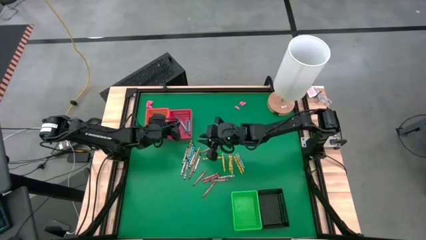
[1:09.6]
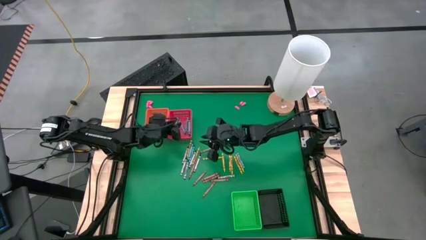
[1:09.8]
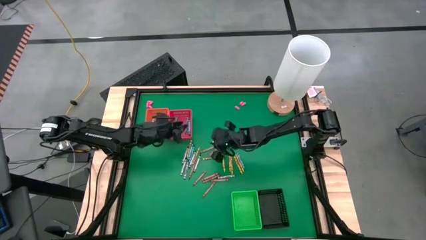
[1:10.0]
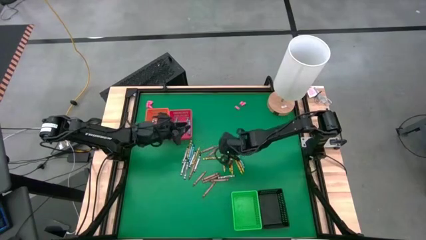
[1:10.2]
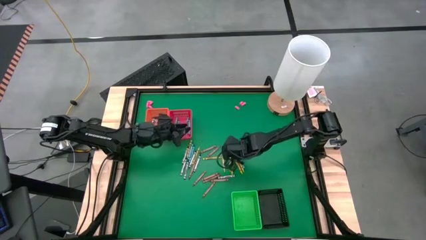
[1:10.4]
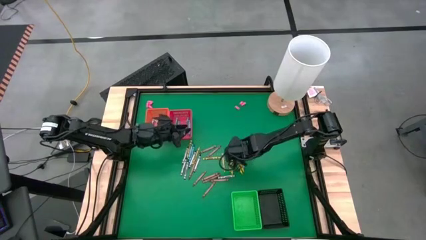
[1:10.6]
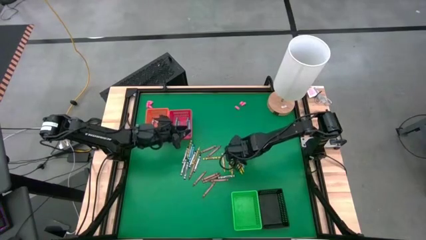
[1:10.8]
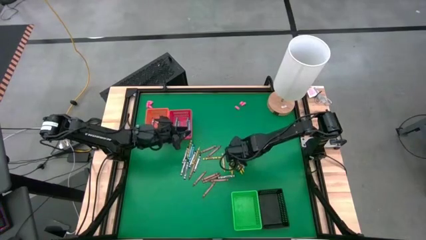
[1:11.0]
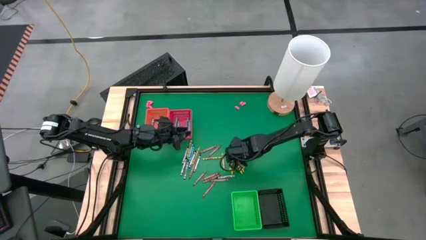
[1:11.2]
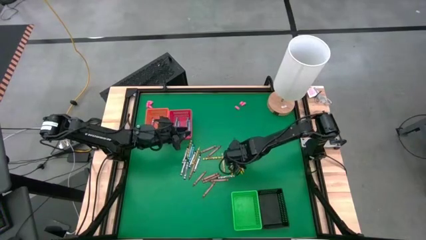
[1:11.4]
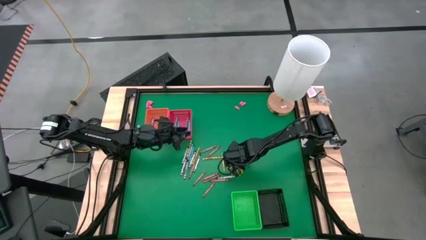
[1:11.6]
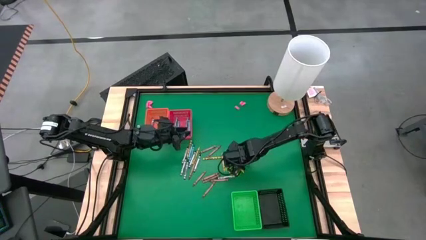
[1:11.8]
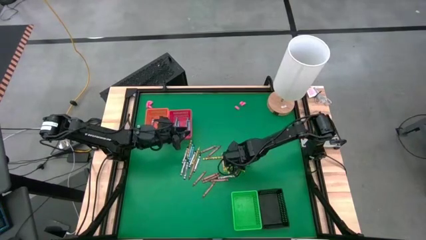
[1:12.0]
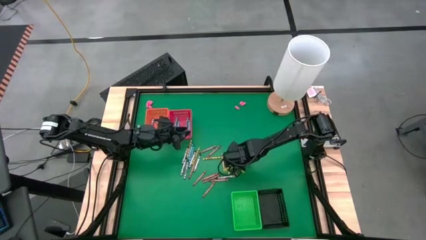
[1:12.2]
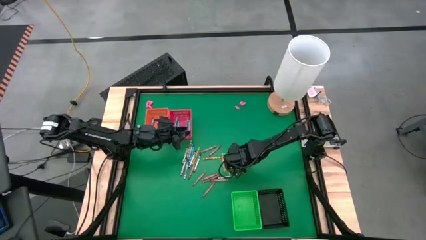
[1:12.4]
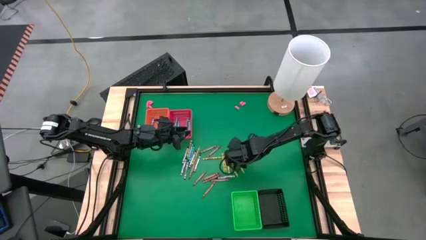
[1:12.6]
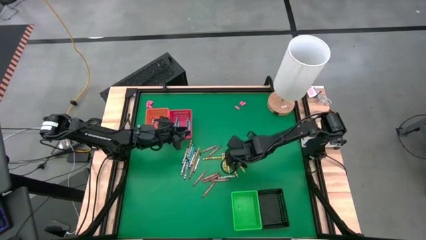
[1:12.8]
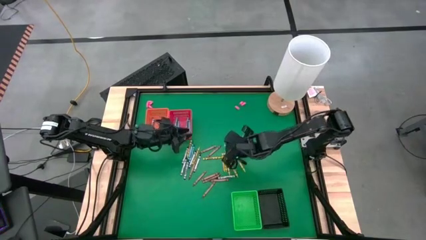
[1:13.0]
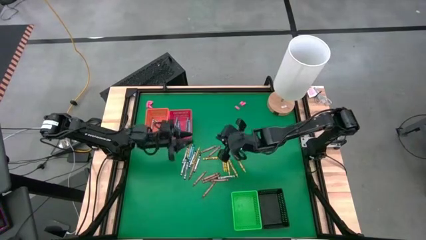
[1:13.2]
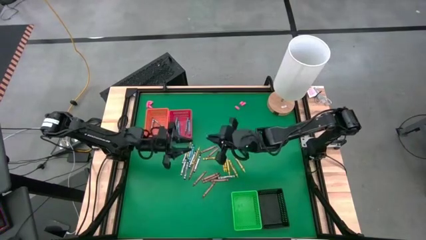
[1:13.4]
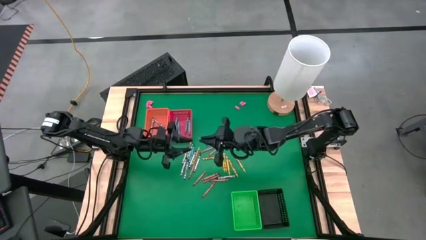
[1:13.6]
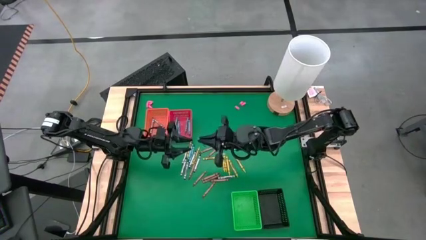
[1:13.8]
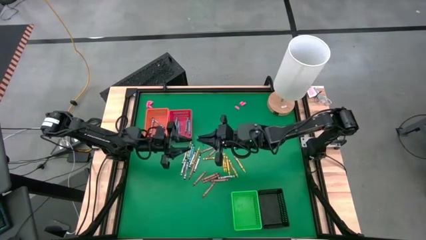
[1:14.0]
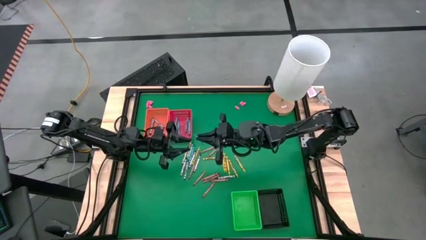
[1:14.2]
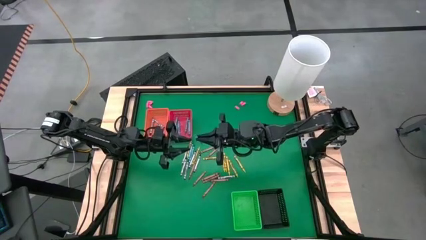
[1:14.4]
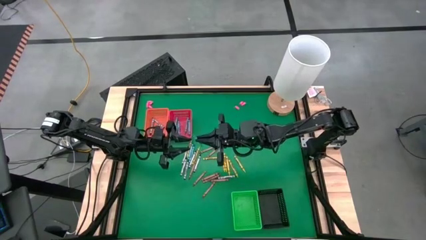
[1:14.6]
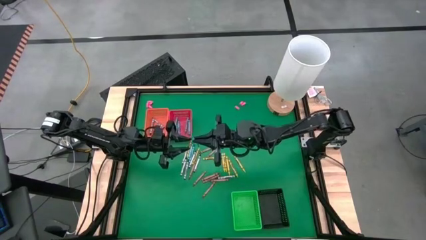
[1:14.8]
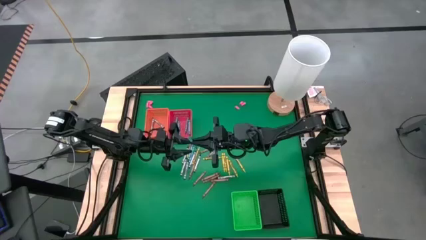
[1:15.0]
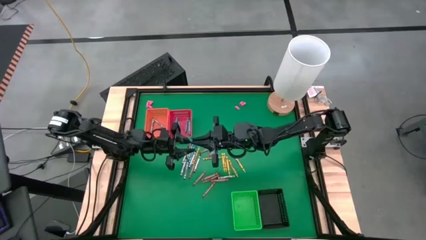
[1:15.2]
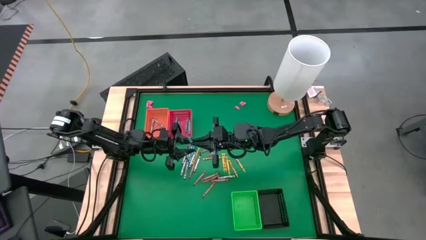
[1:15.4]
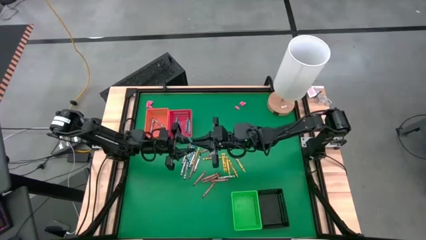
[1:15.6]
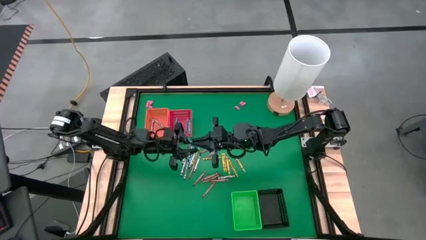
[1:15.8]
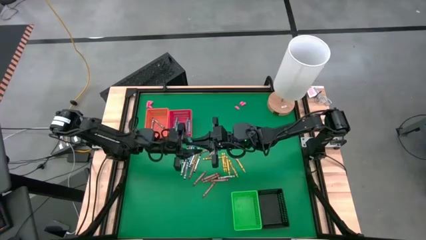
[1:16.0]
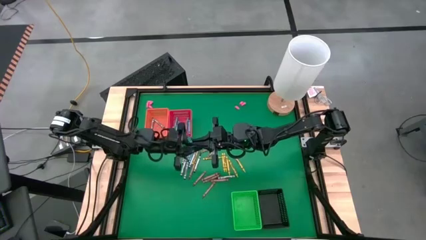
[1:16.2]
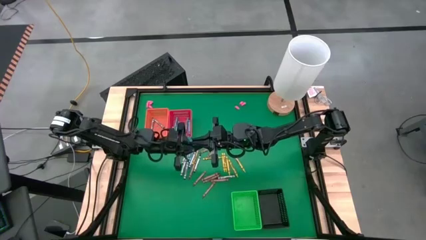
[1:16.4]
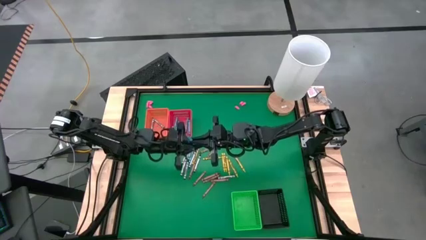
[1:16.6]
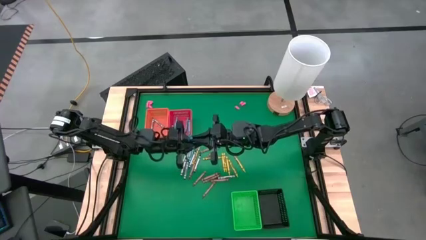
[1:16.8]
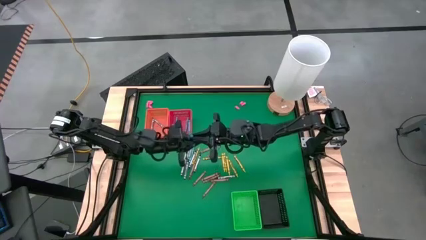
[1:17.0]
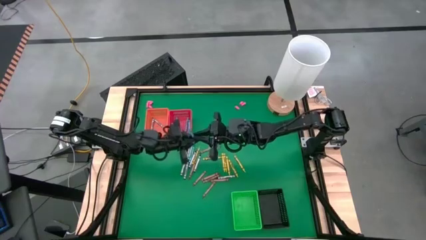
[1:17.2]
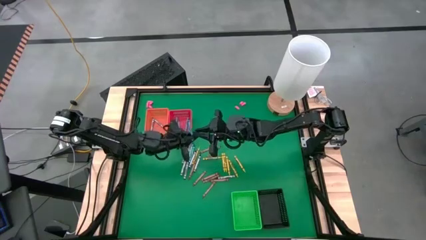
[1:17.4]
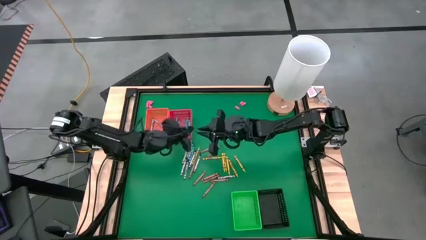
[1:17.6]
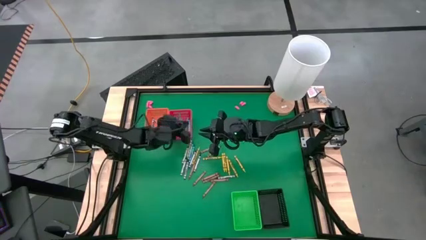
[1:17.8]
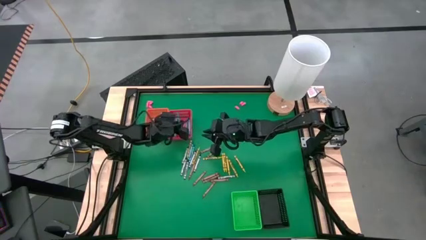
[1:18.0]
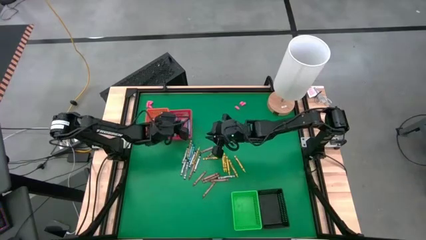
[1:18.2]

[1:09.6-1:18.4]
Task: Sort crayons
Put the blue crayon into the red bin

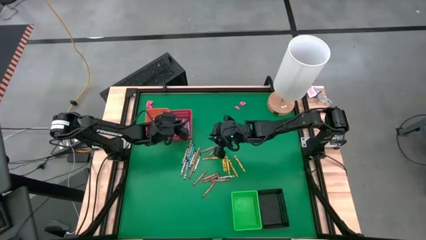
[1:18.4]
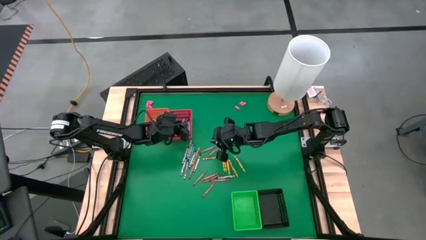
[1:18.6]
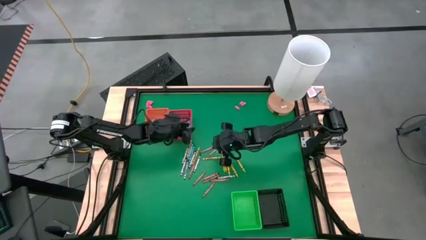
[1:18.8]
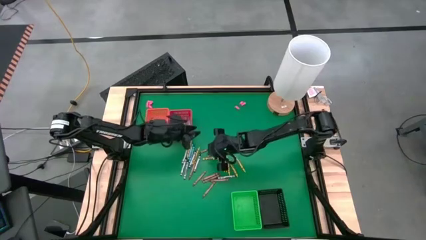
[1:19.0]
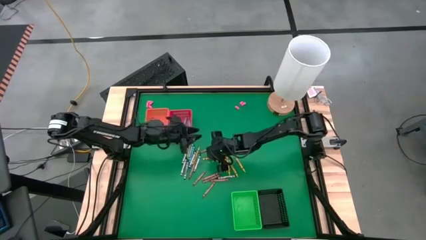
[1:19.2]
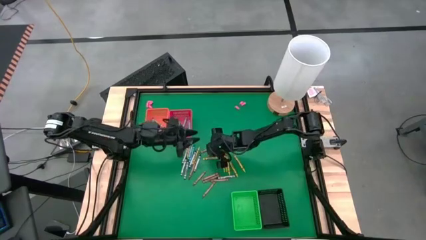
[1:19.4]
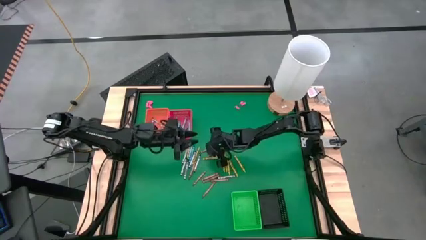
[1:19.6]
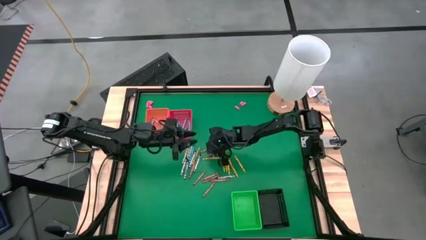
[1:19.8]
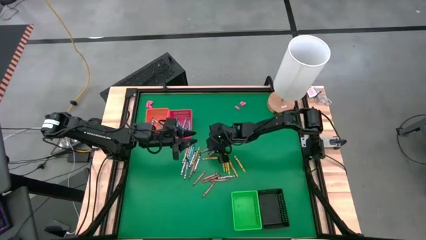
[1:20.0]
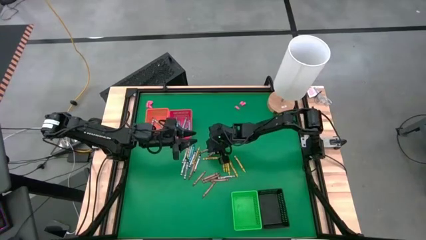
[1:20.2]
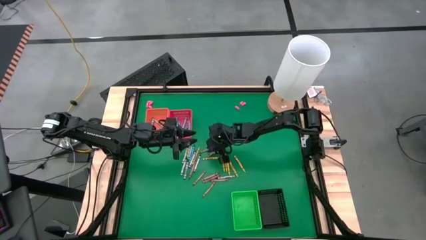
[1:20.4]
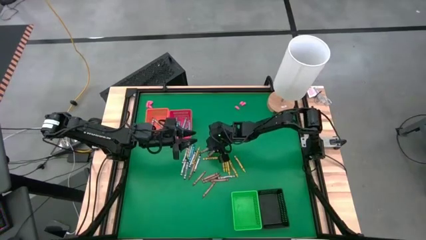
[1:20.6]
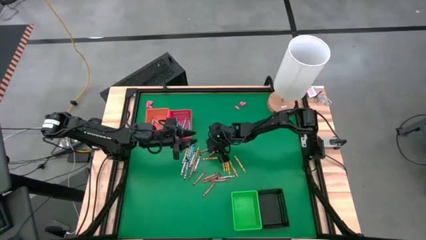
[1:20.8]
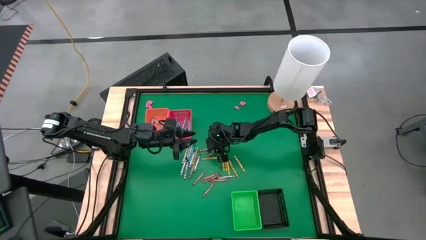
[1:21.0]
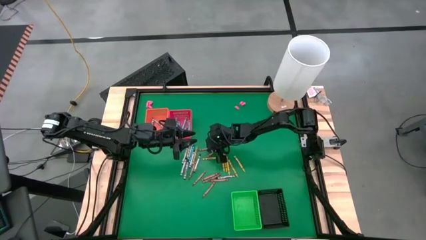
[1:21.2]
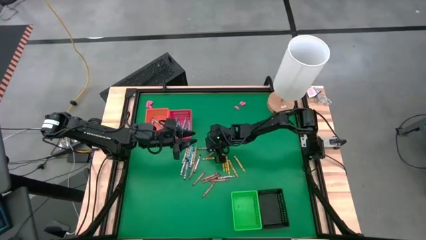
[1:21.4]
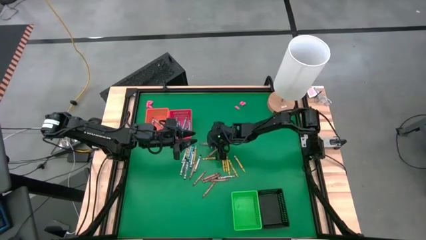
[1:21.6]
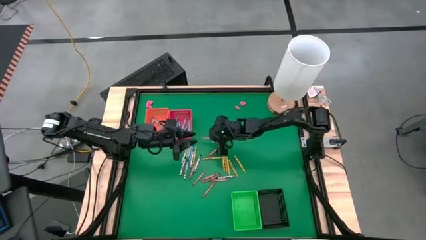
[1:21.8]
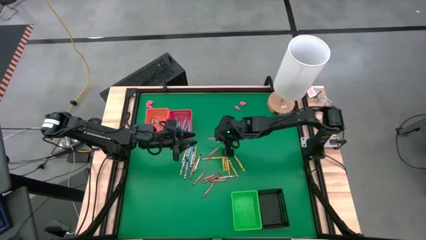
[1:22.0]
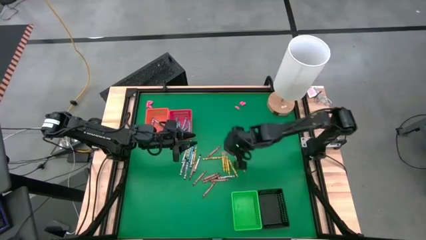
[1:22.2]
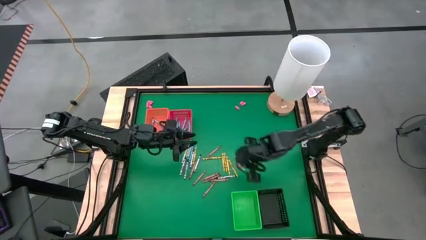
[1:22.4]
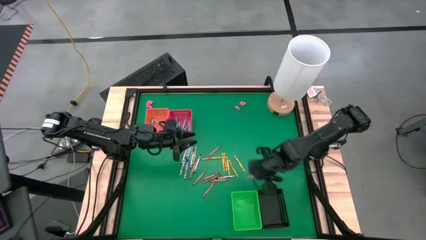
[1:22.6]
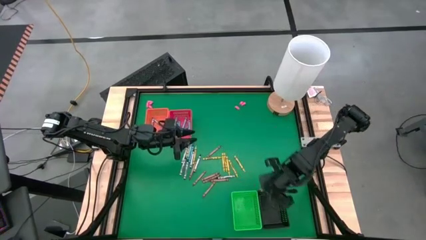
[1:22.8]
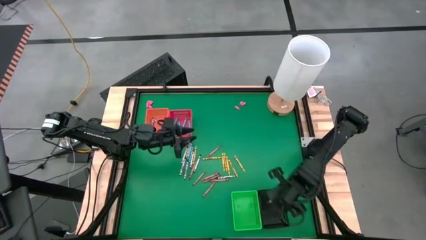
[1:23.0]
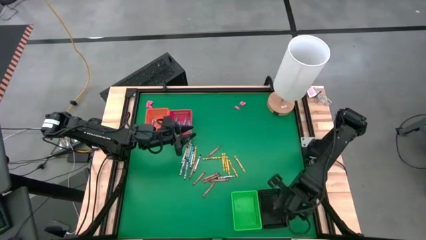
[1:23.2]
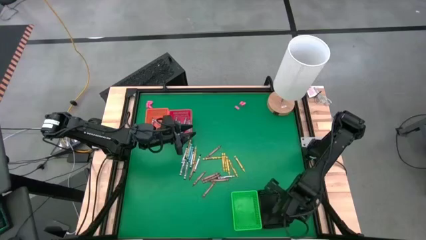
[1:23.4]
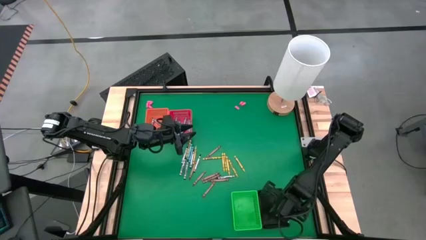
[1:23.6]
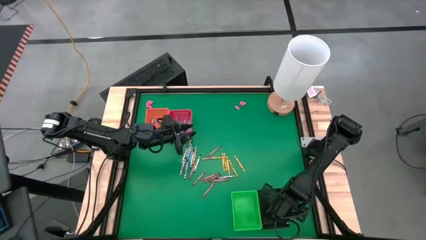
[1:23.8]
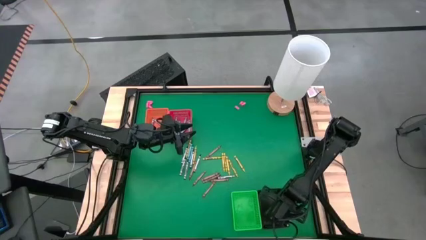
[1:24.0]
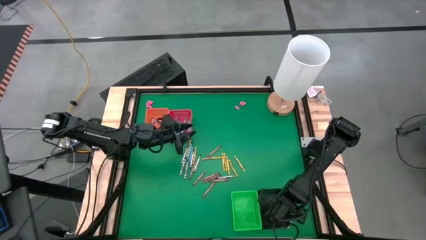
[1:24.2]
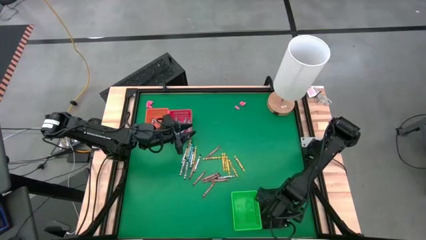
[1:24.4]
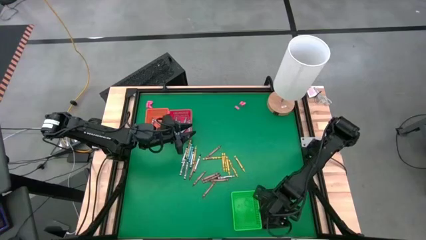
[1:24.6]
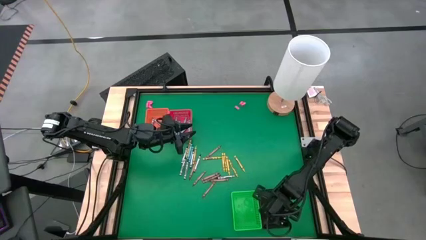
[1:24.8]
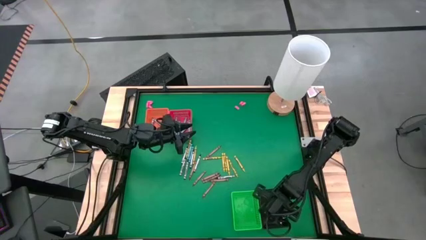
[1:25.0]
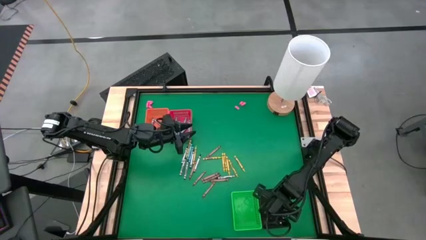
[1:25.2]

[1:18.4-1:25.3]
Put the brown crayon into the black bin
